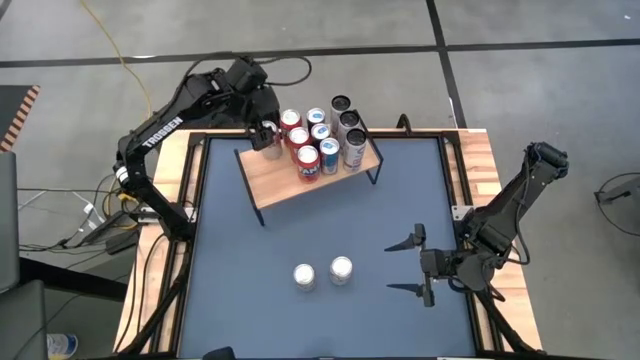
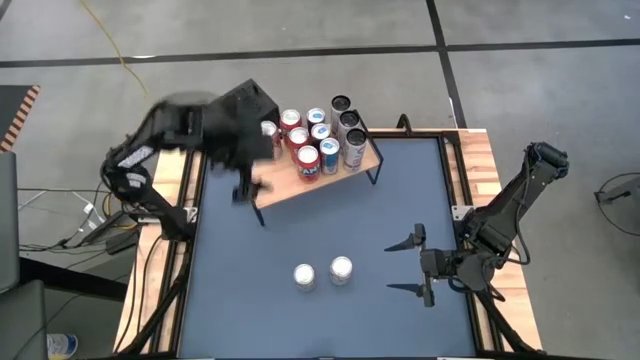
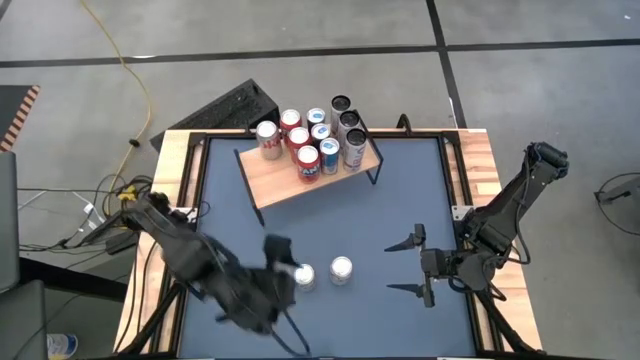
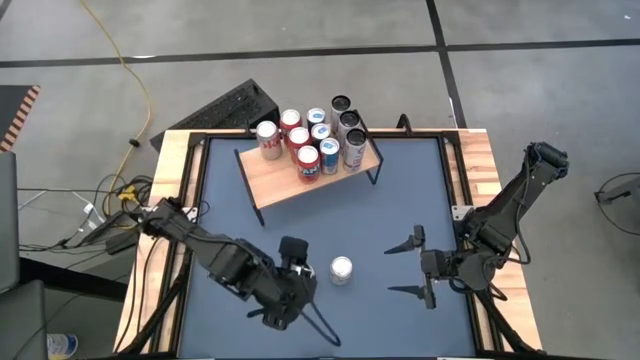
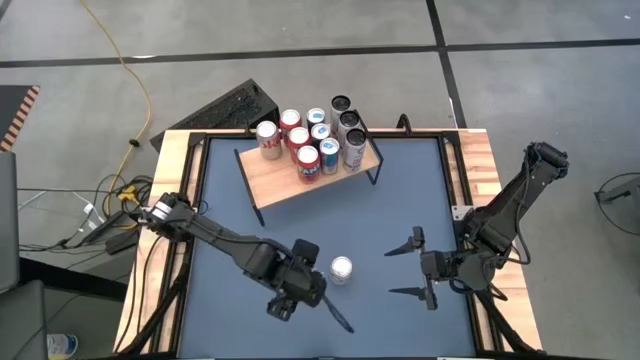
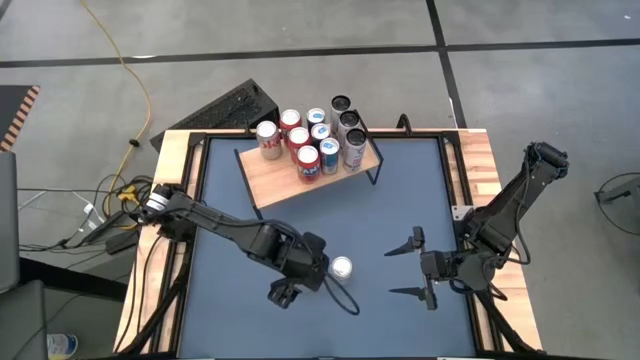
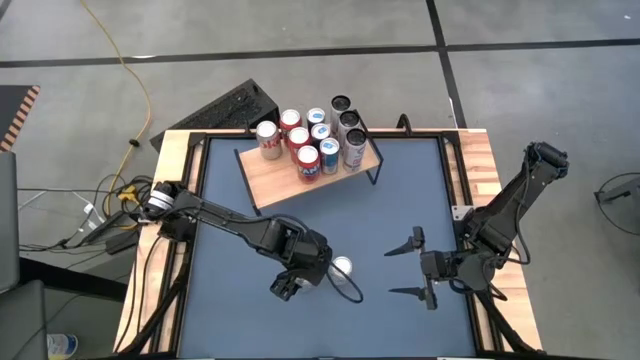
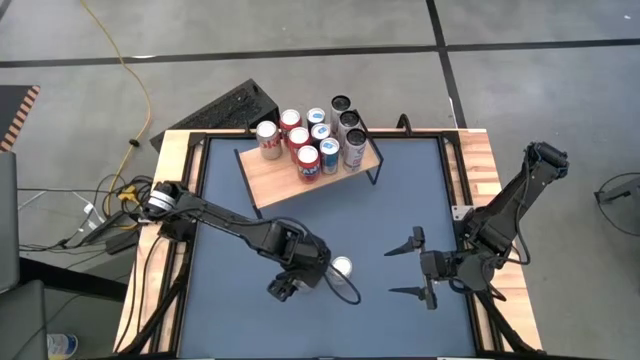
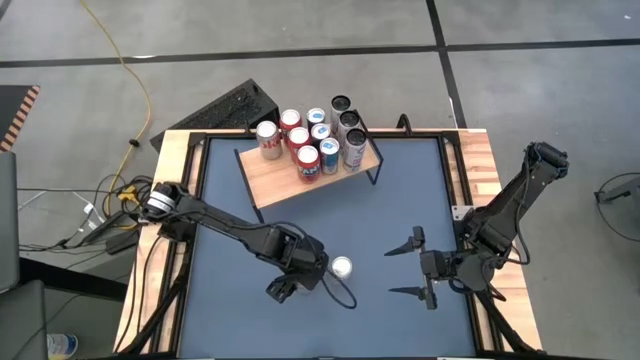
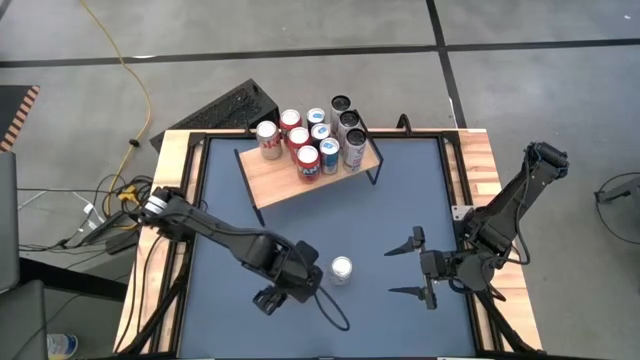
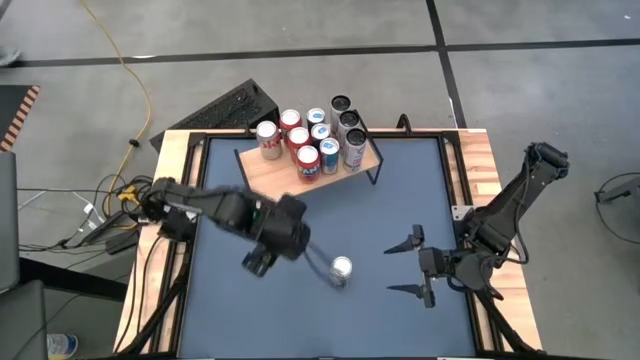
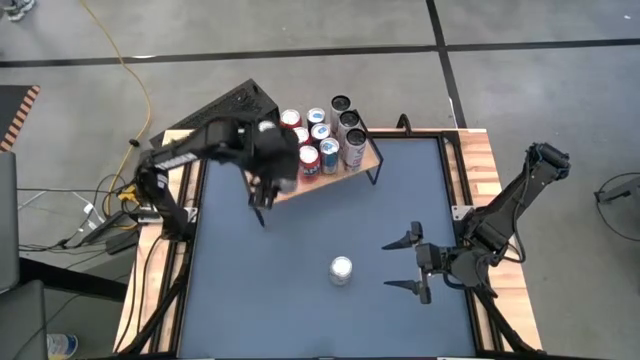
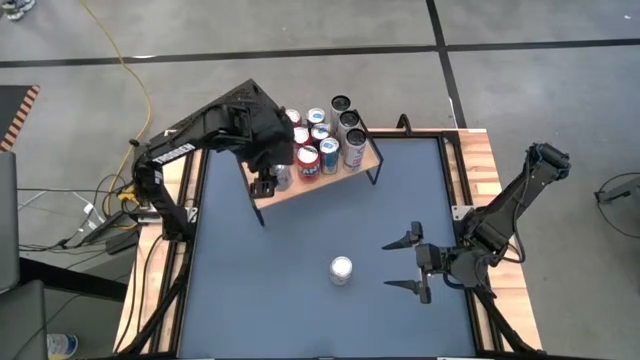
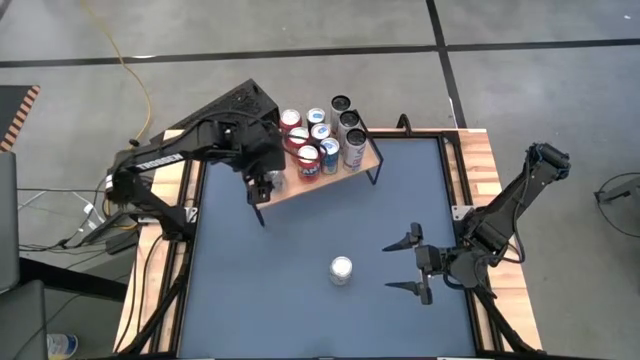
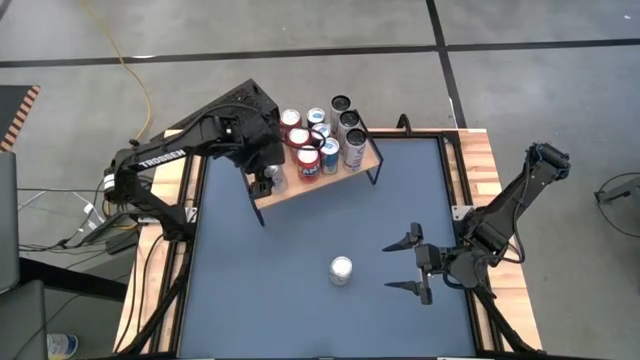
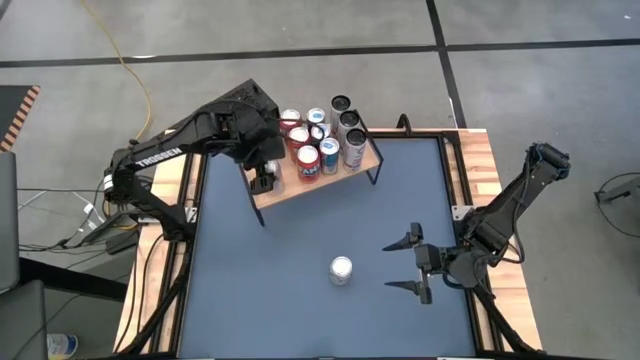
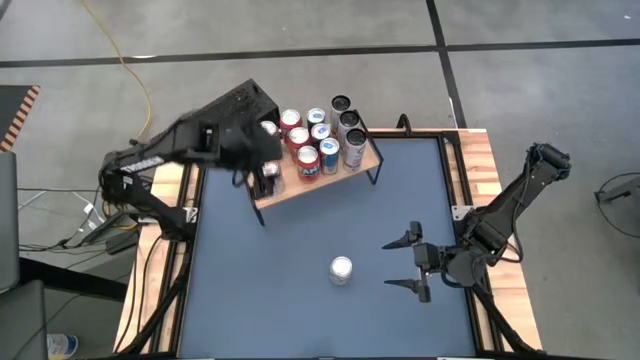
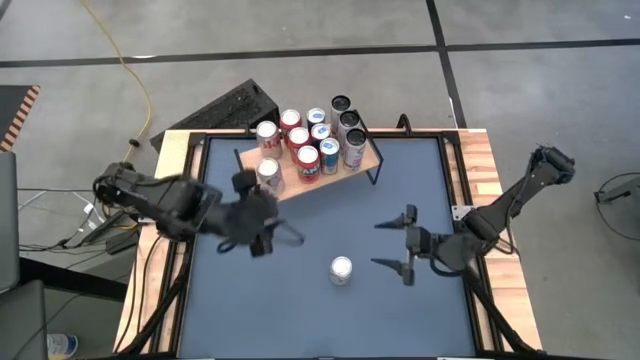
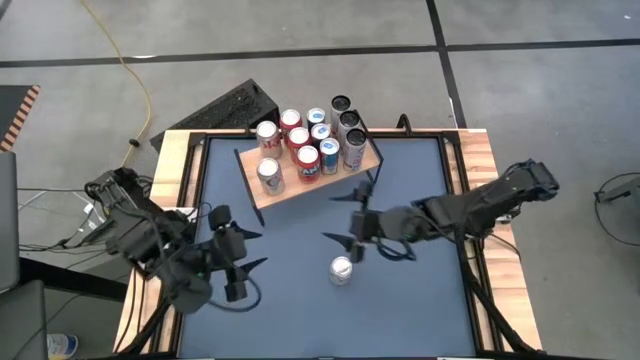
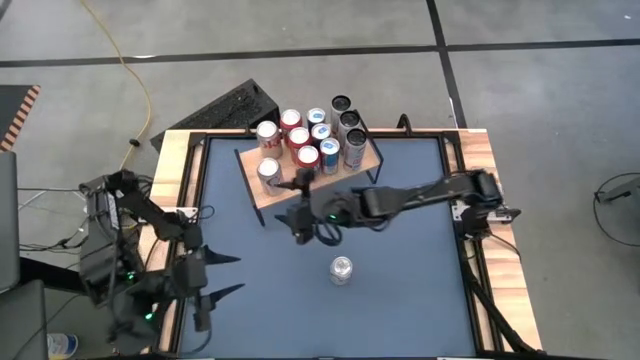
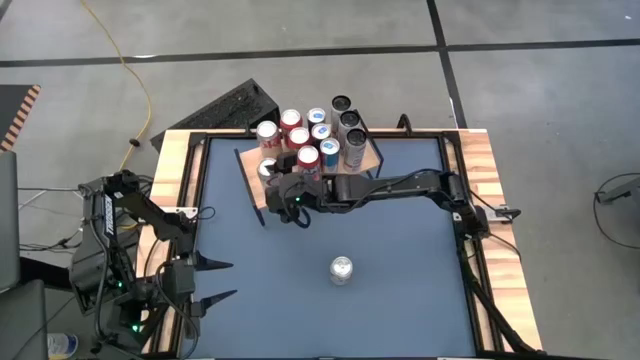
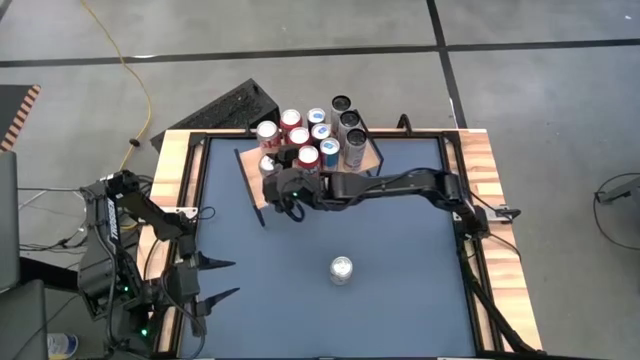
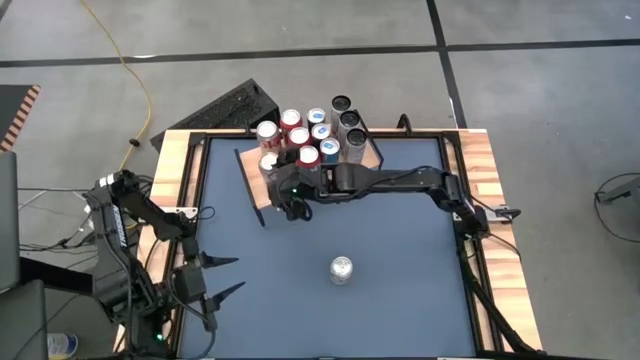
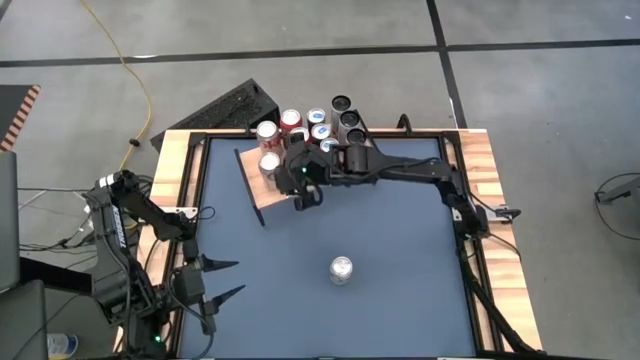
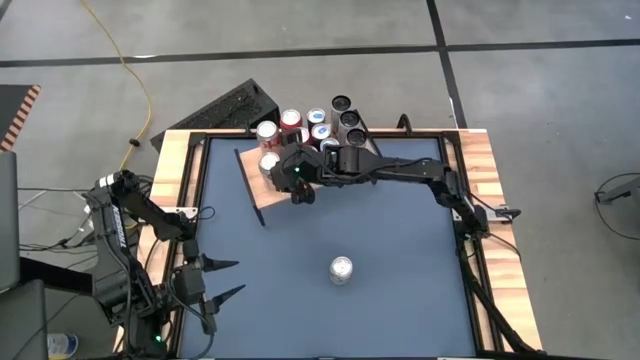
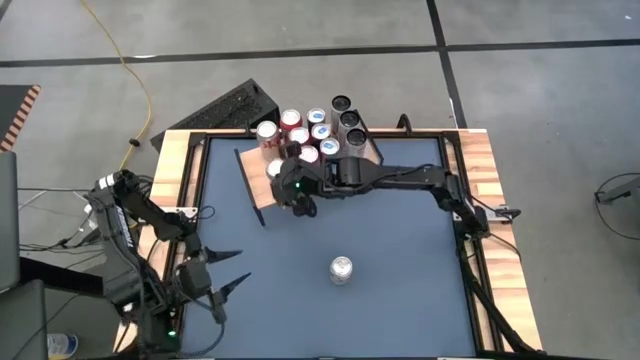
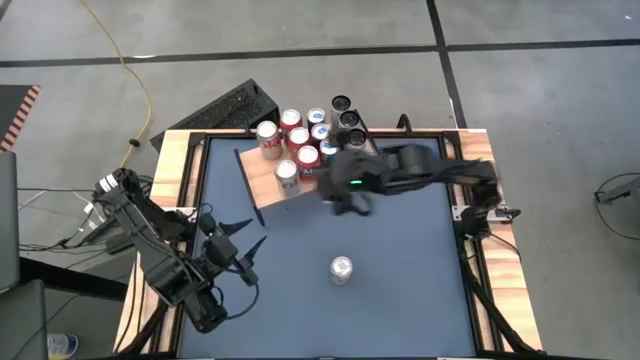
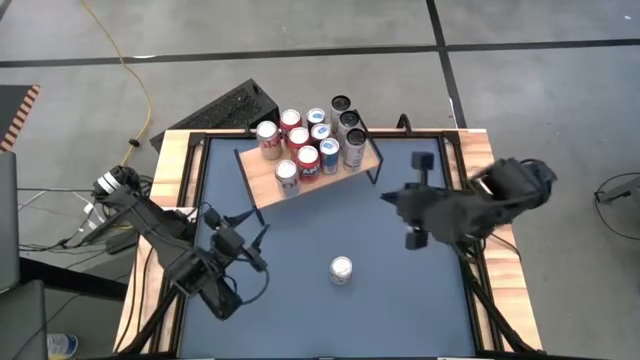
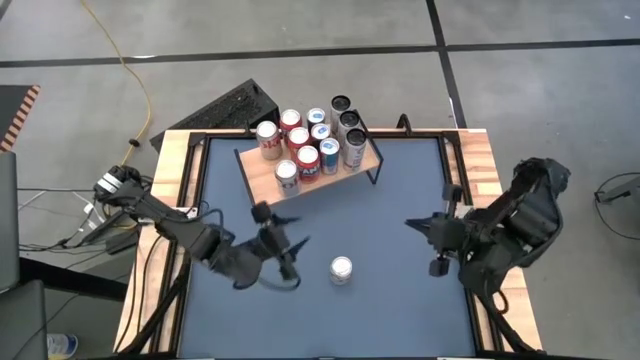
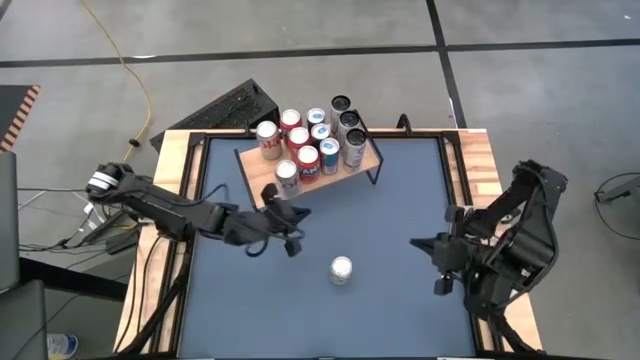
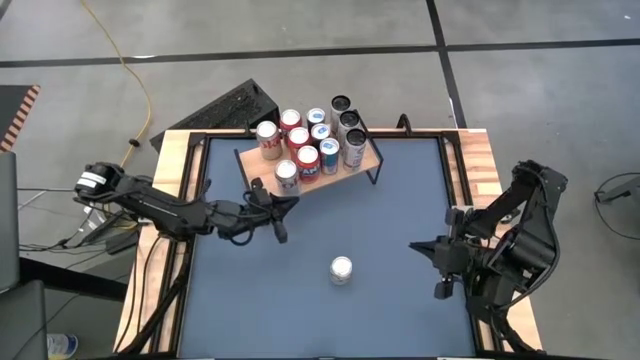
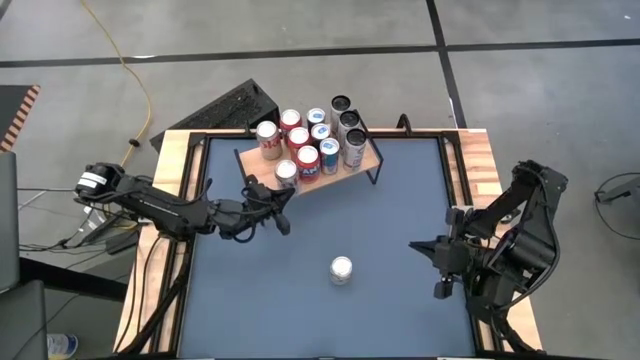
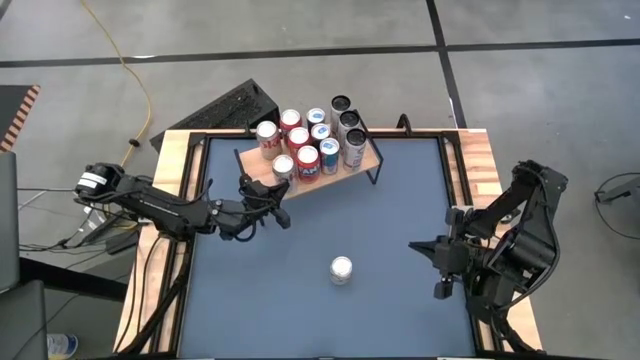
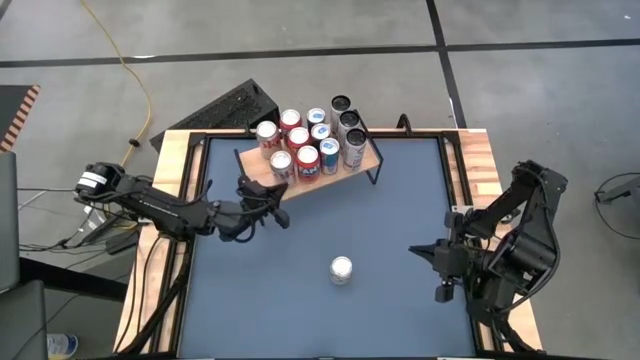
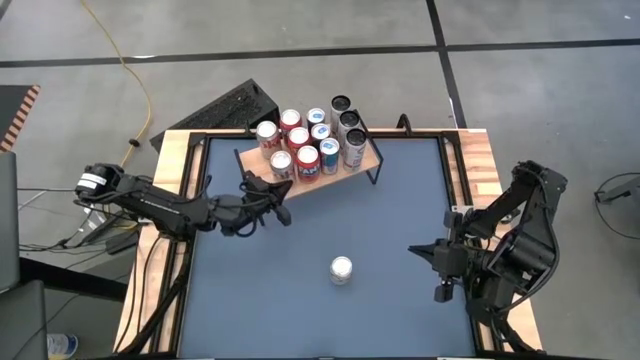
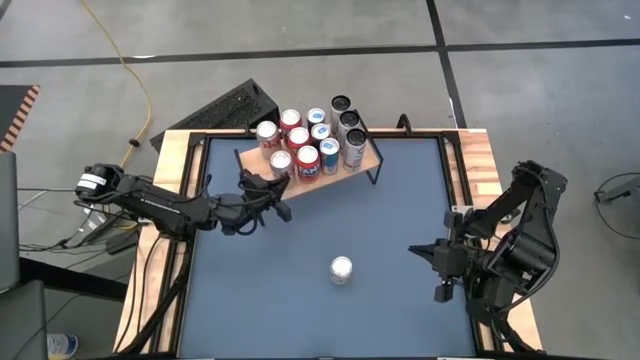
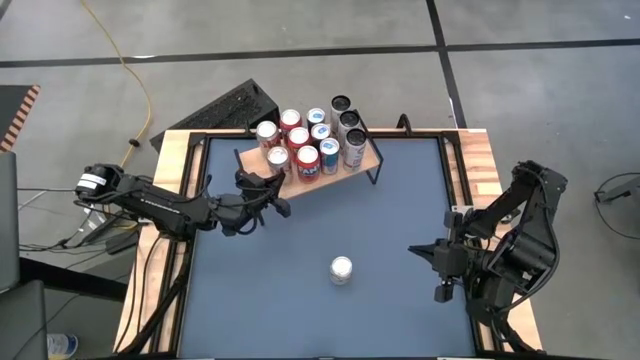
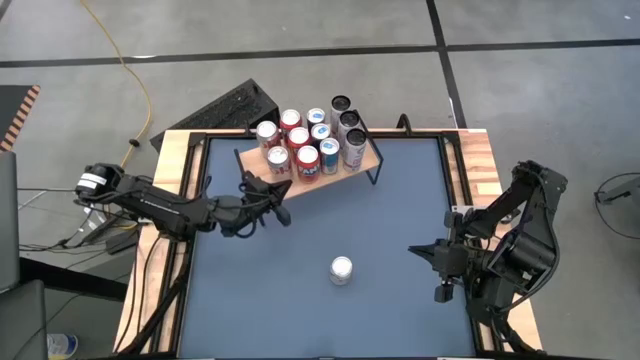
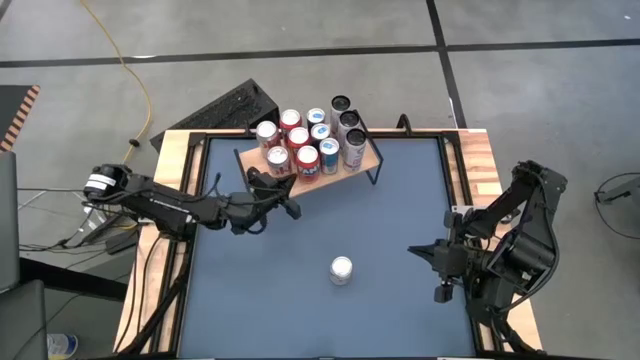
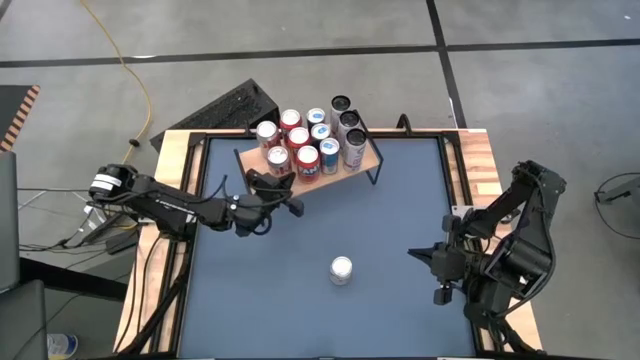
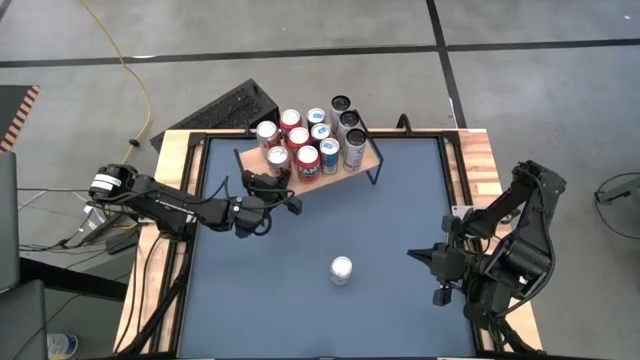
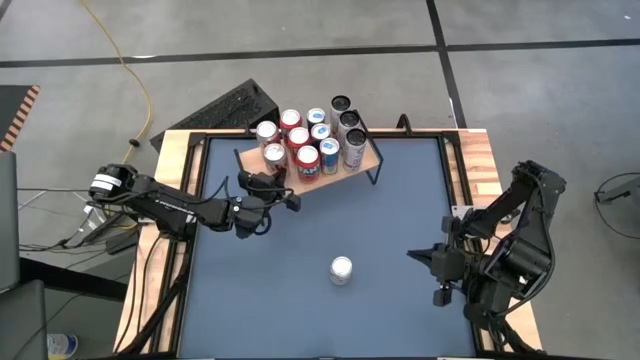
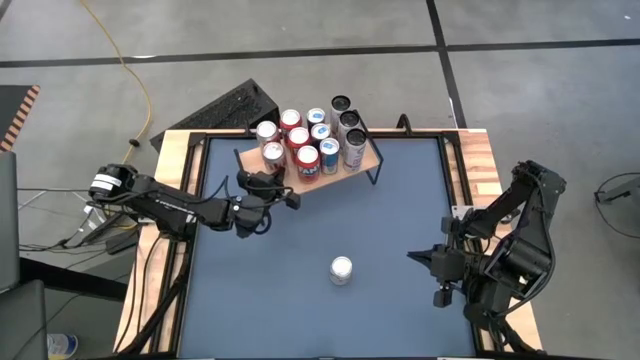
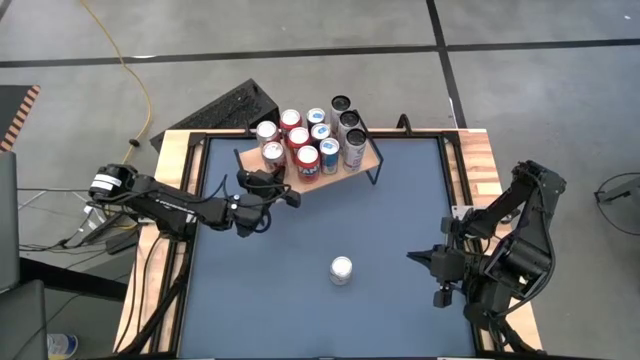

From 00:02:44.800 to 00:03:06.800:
Task: Place canned beverage on shelf
Put the left silver soda can on the shelf aligned with the other silver soda can
